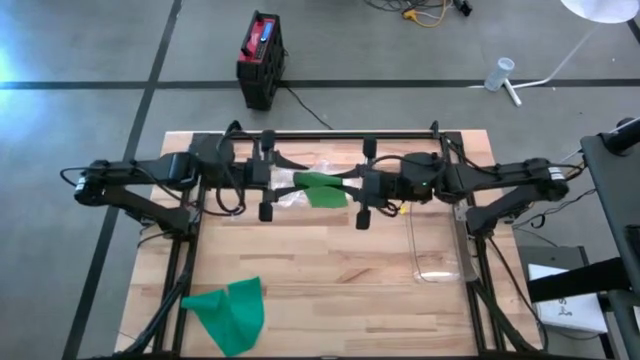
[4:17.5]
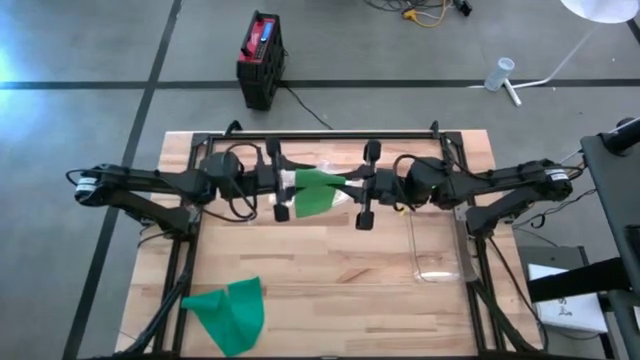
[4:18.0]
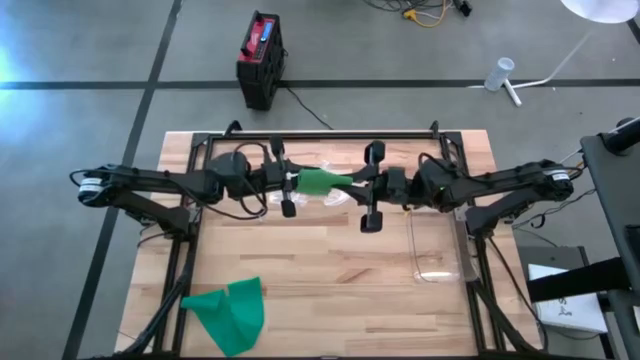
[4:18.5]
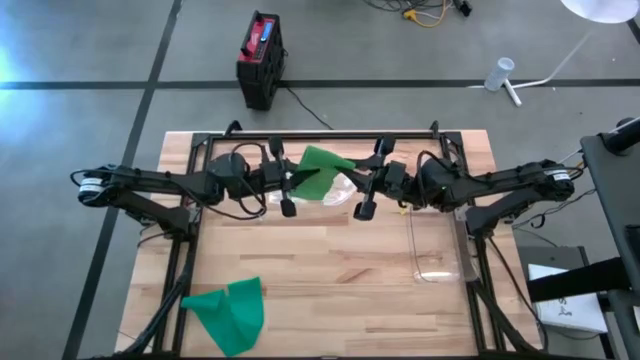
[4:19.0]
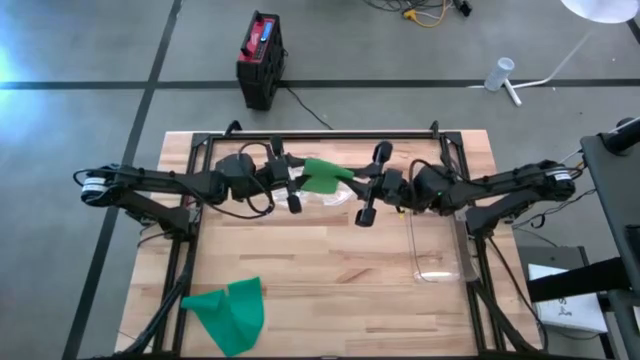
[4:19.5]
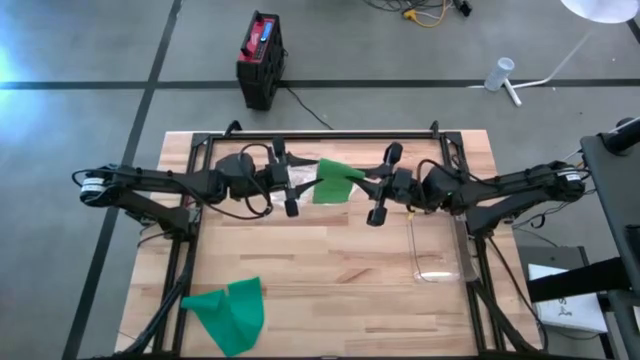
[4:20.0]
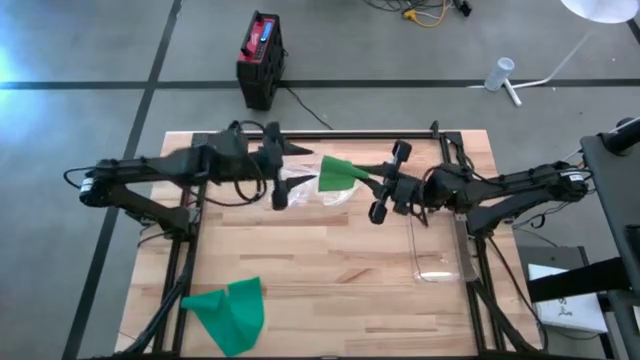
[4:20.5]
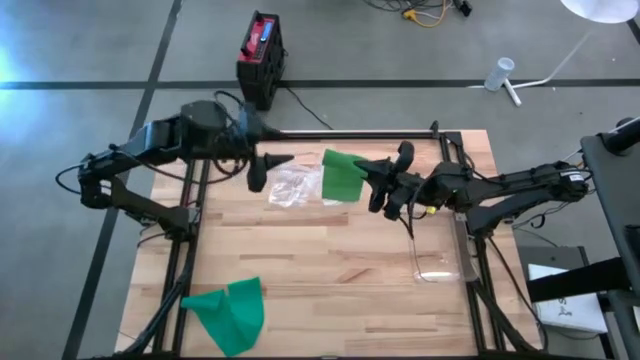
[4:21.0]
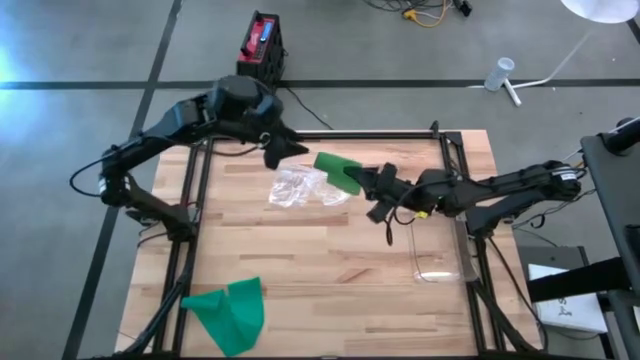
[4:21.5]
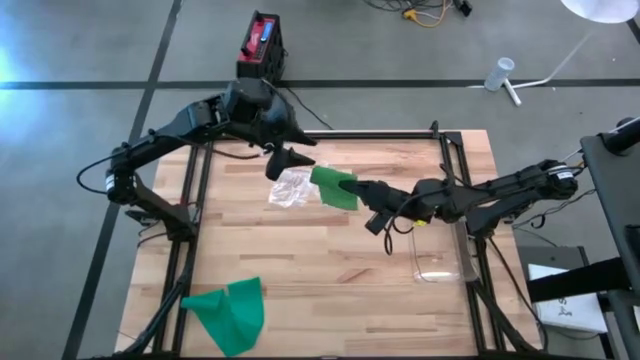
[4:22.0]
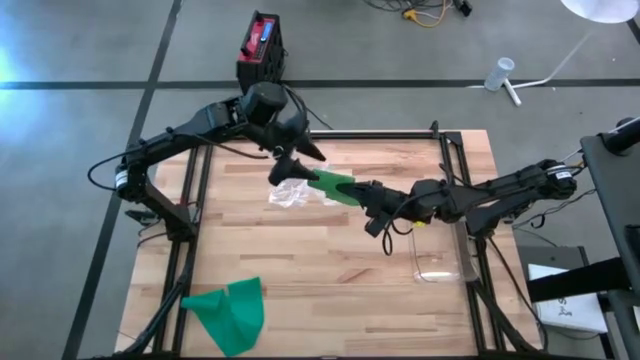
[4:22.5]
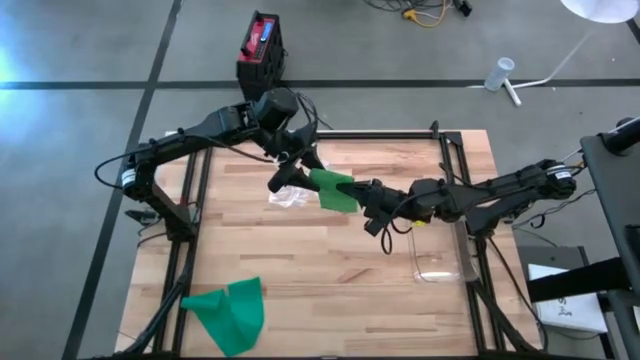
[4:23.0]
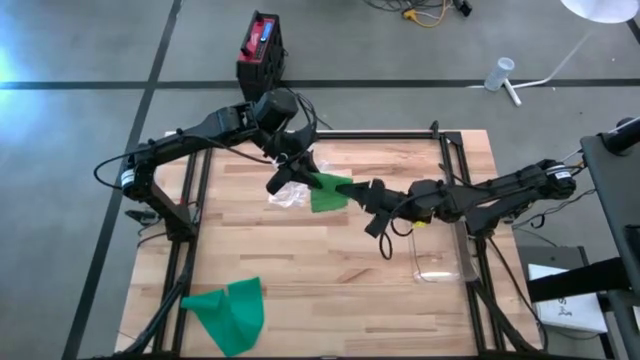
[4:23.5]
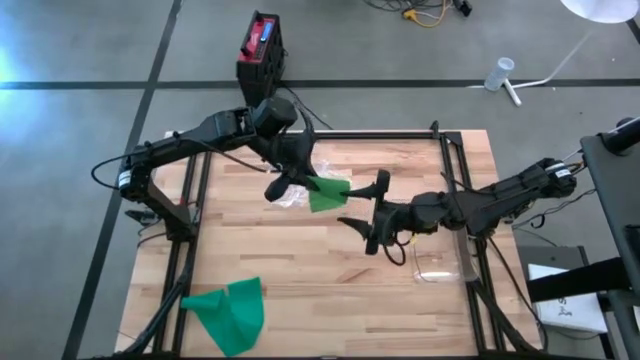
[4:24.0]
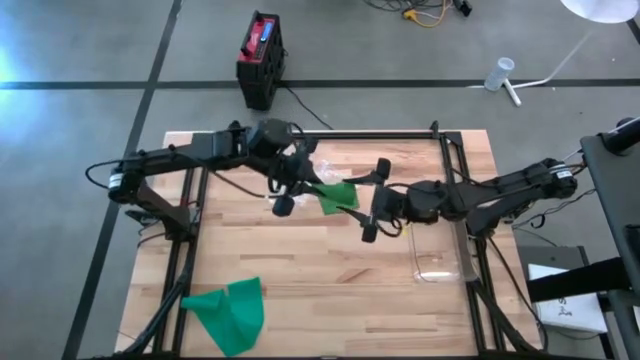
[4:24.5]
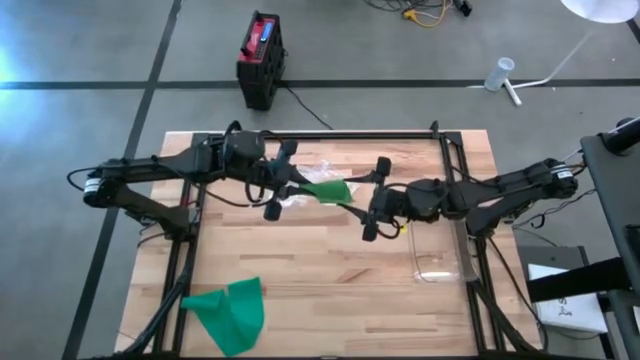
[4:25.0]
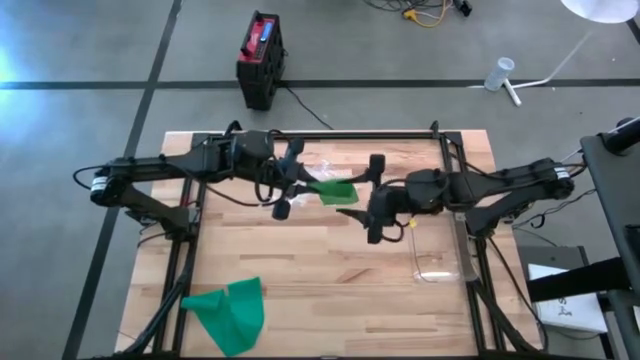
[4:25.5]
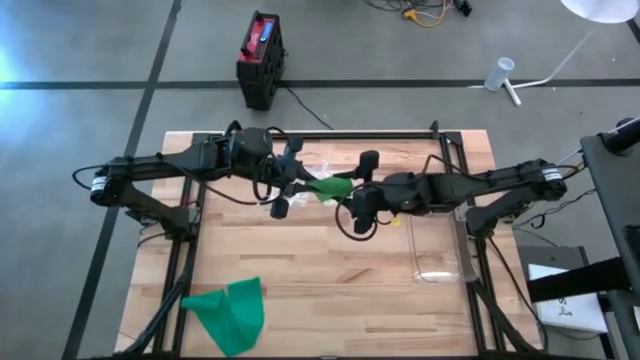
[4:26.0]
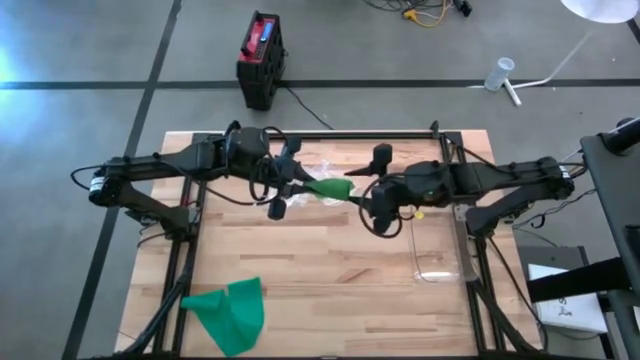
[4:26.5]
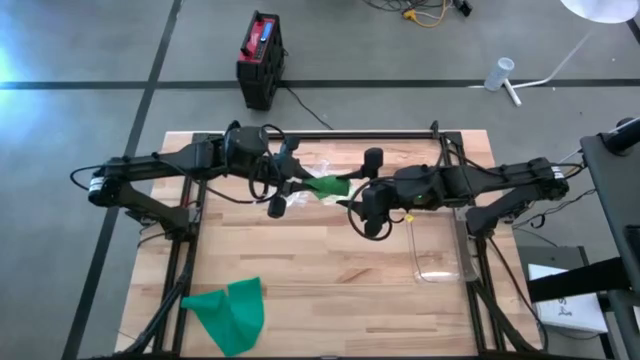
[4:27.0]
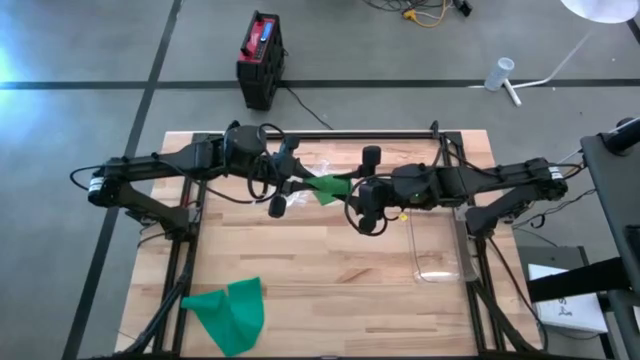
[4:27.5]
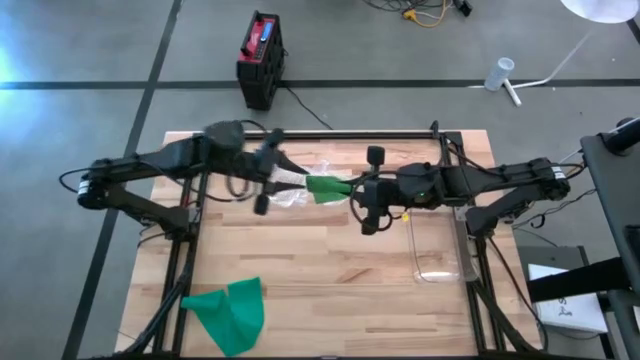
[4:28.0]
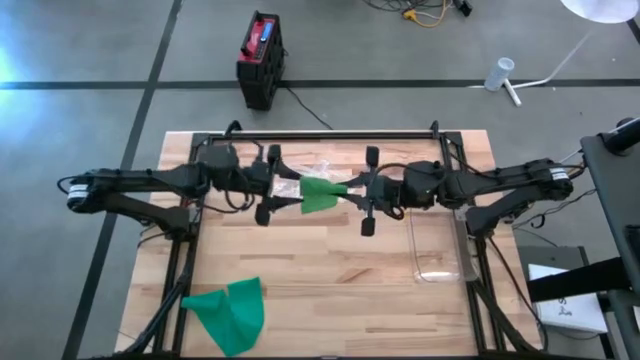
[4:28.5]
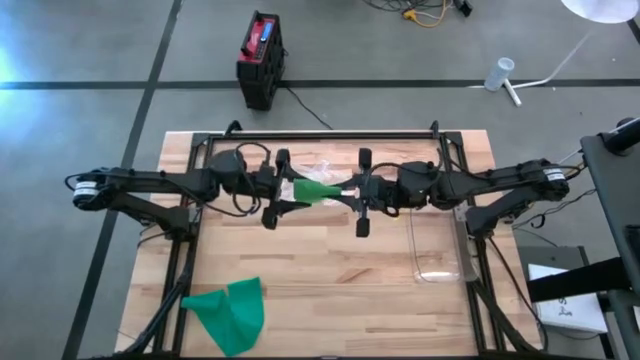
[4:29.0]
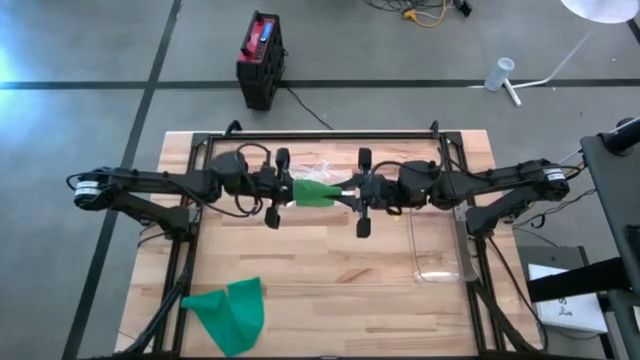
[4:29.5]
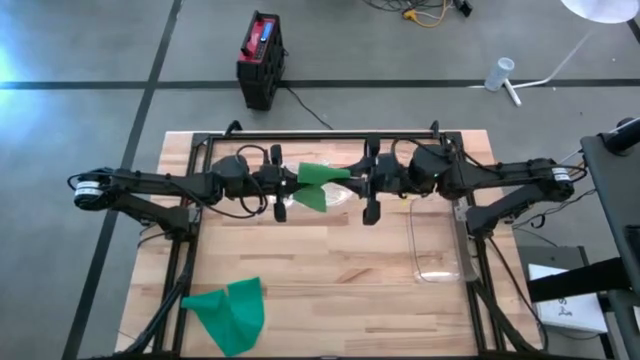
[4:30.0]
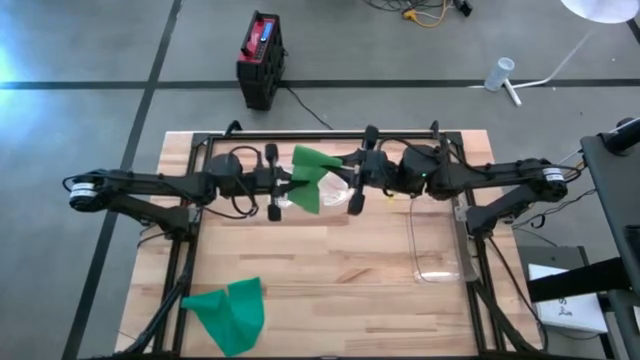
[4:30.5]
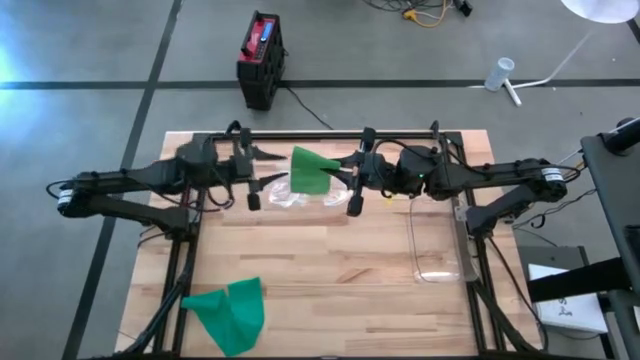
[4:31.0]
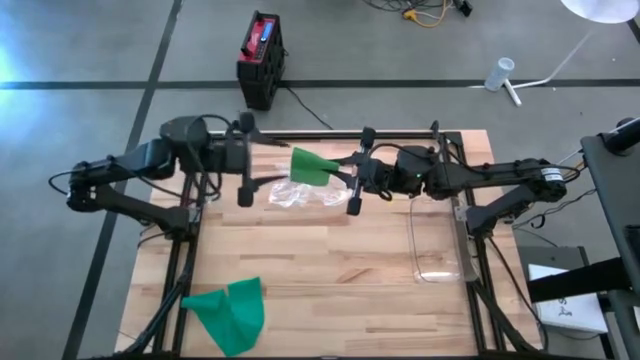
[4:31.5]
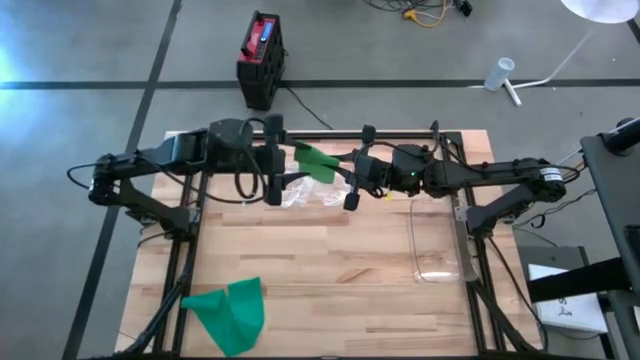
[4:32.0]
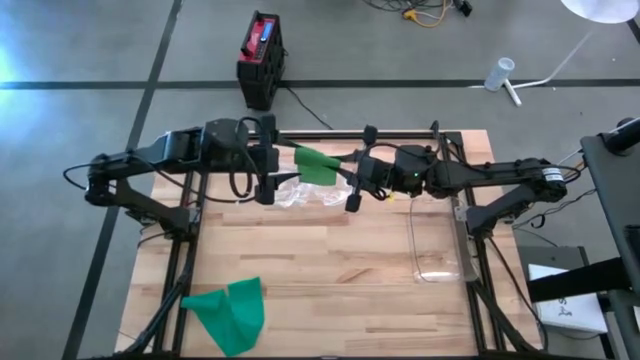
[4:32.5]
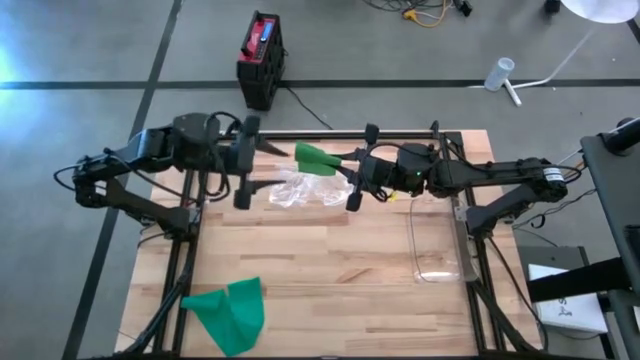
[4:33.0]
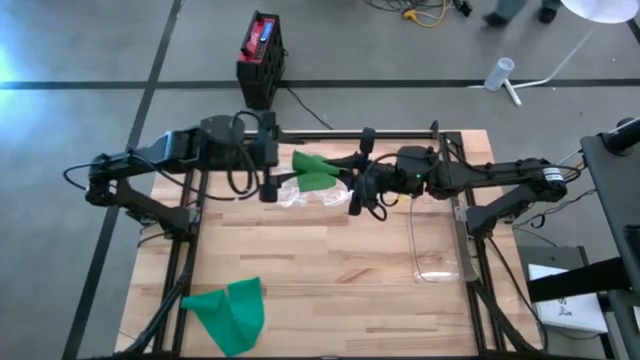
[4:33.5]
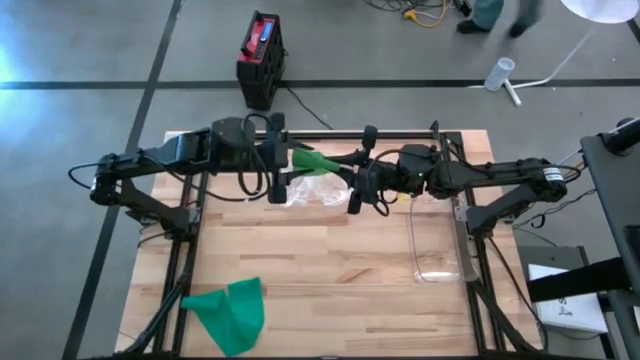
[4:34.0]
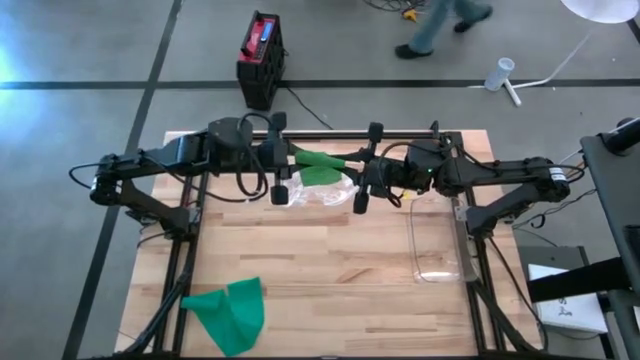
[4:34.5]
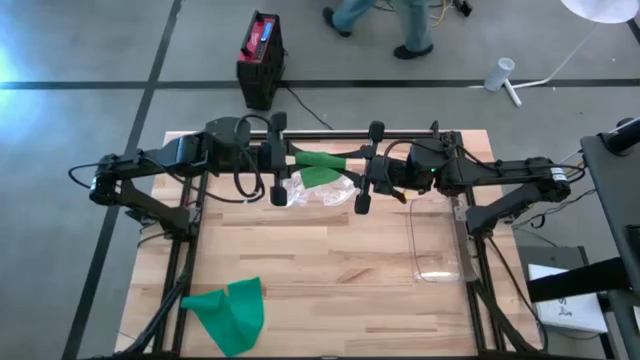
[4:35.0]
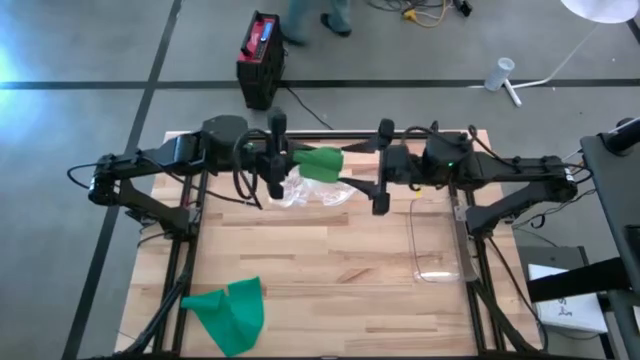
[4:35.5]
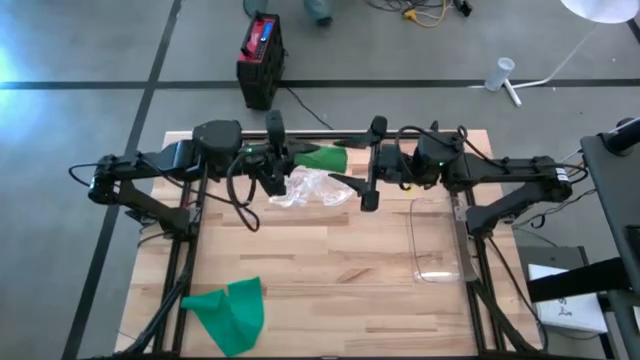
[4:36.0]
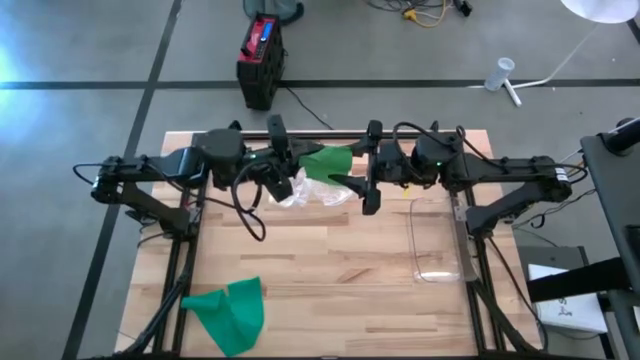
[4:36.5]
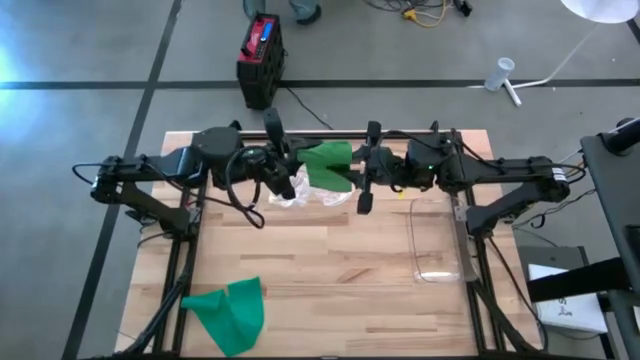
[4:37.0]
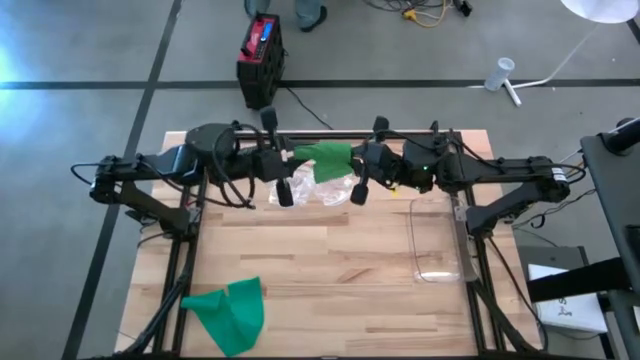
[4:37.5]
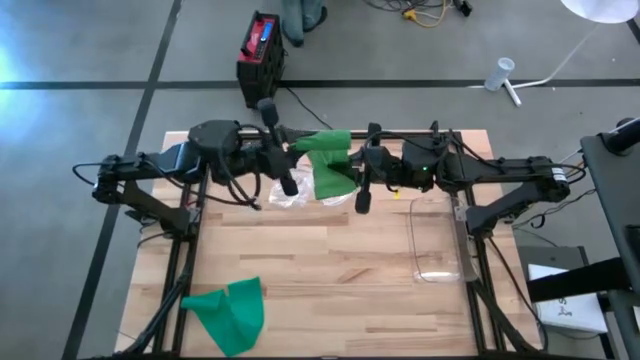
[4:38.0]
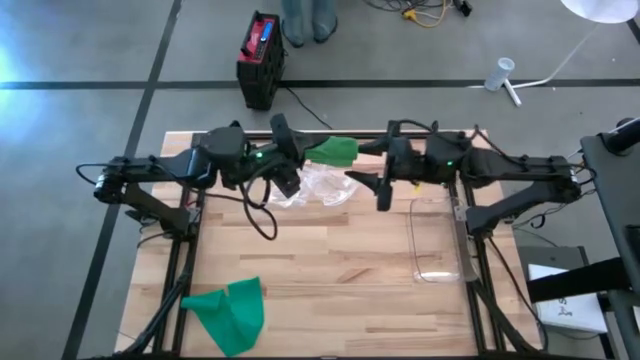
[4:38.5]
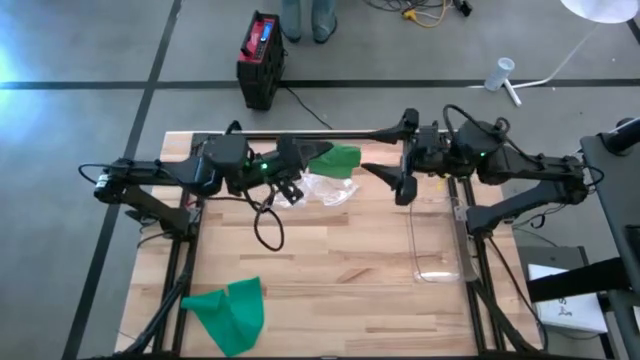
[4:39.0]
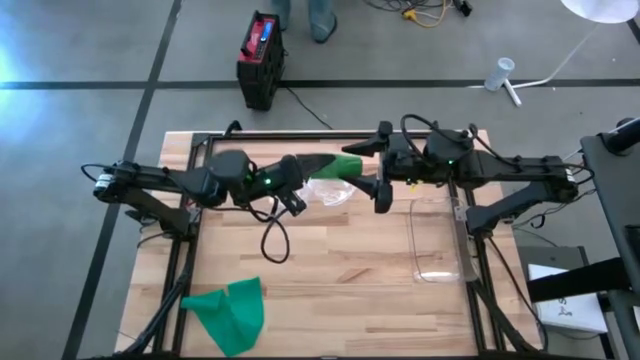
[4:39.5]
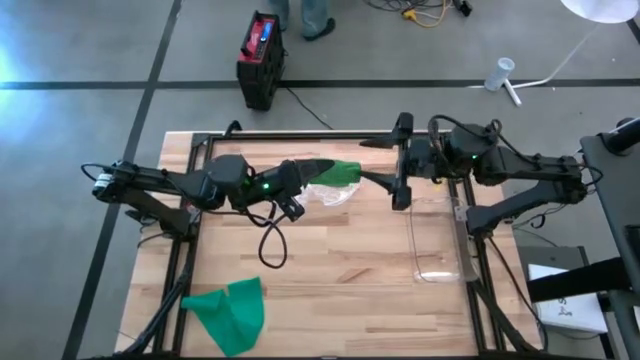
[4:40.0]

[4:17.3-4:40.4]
Task: Roll bandage
Roll the green bandage
